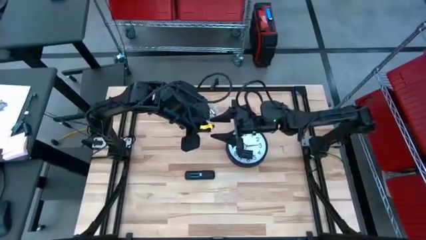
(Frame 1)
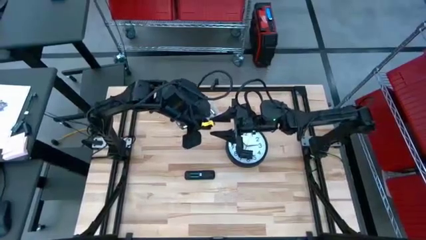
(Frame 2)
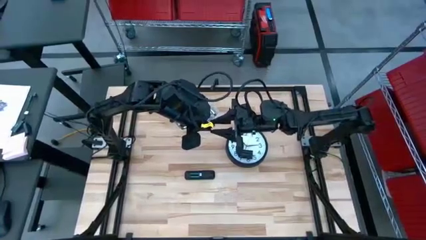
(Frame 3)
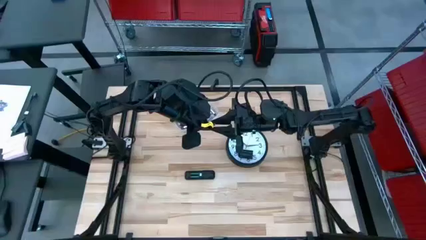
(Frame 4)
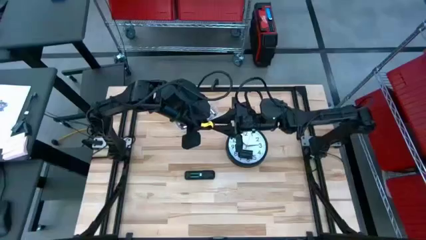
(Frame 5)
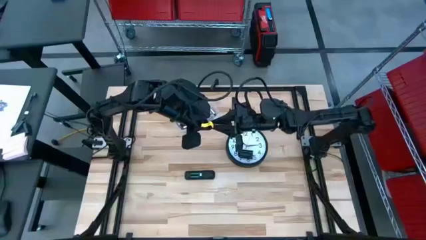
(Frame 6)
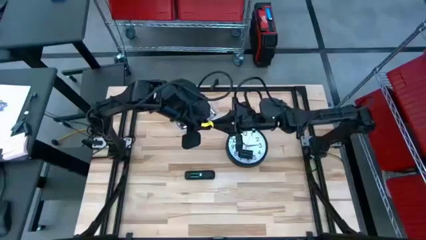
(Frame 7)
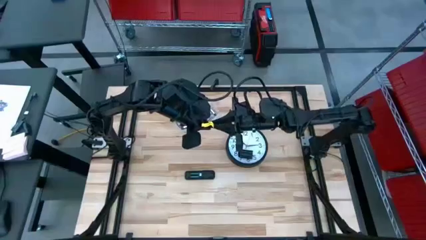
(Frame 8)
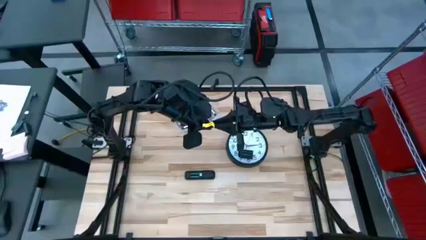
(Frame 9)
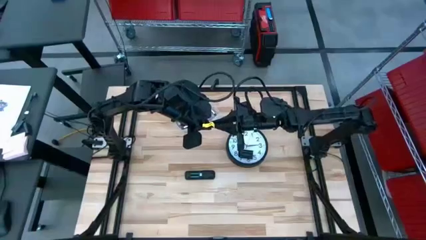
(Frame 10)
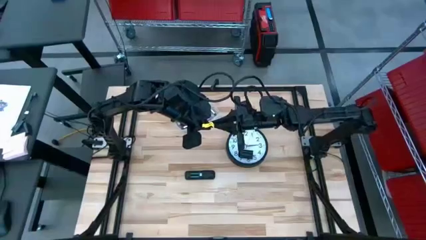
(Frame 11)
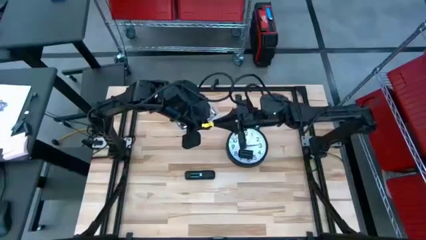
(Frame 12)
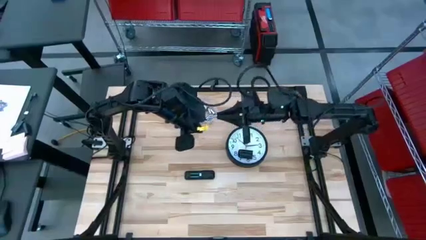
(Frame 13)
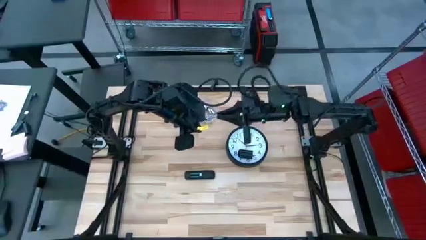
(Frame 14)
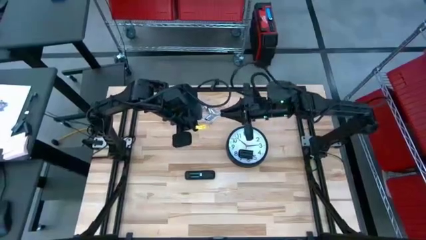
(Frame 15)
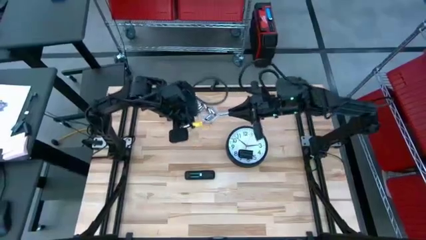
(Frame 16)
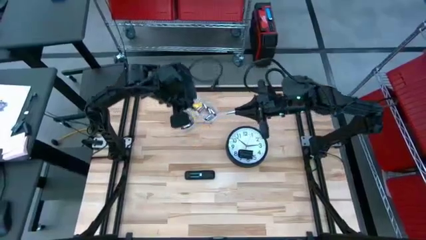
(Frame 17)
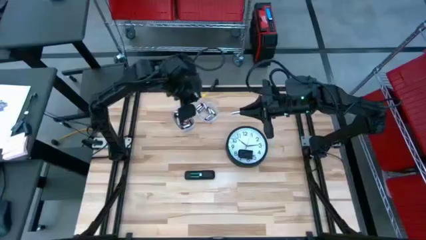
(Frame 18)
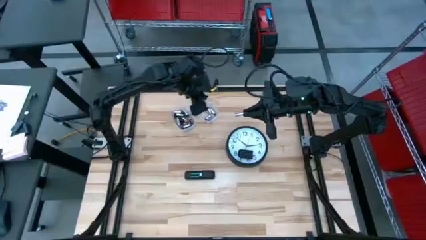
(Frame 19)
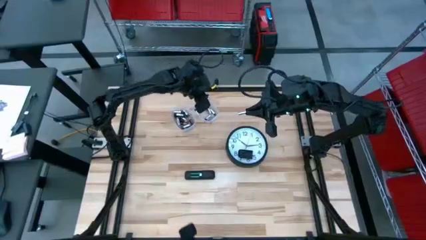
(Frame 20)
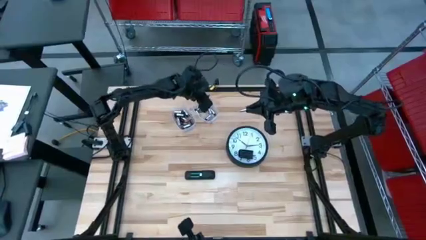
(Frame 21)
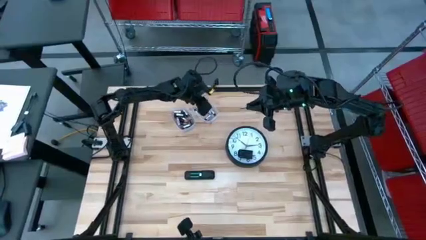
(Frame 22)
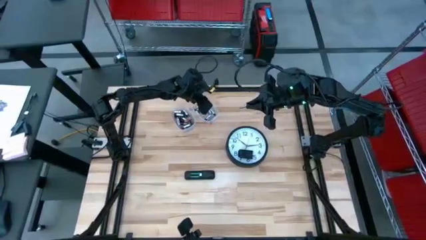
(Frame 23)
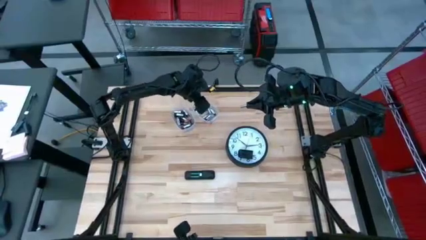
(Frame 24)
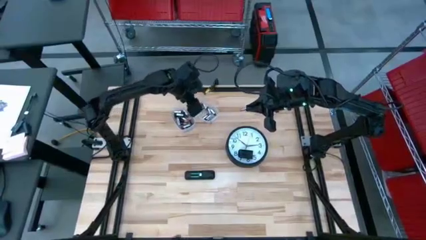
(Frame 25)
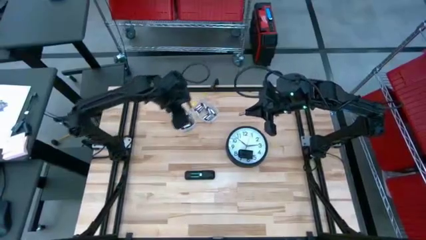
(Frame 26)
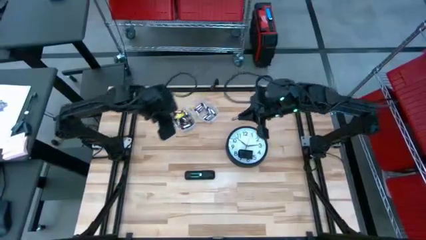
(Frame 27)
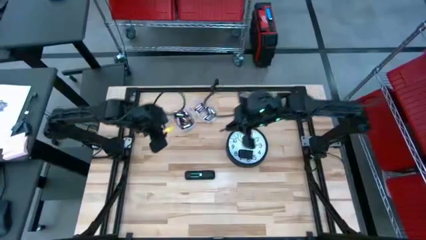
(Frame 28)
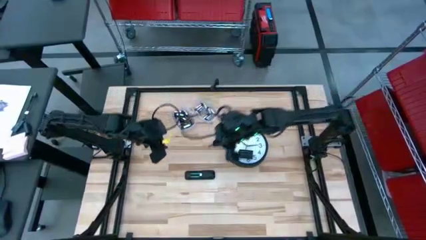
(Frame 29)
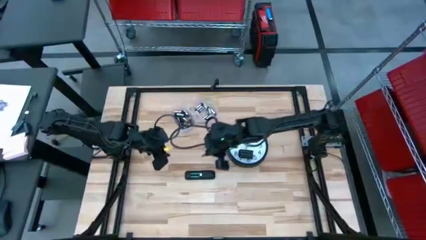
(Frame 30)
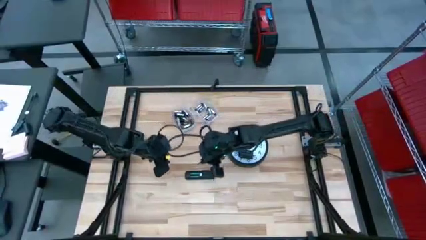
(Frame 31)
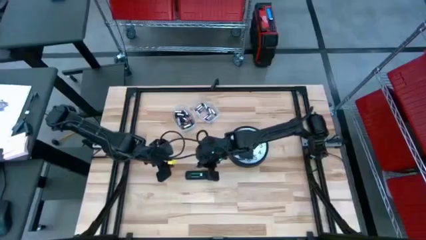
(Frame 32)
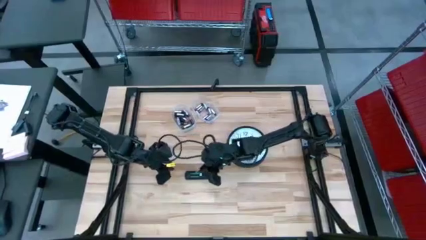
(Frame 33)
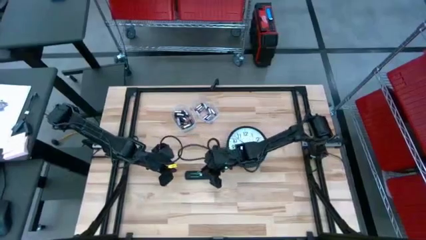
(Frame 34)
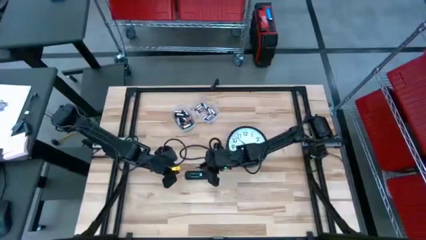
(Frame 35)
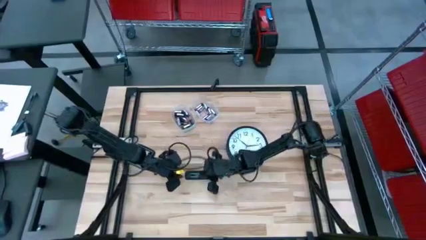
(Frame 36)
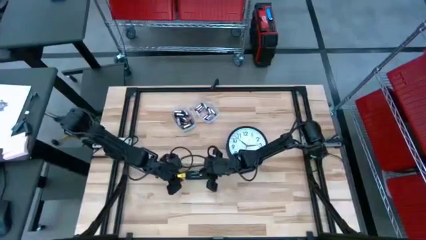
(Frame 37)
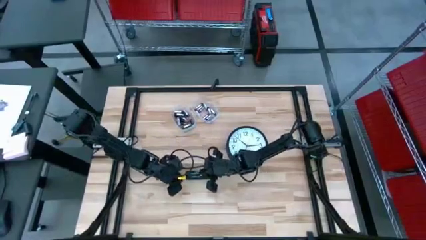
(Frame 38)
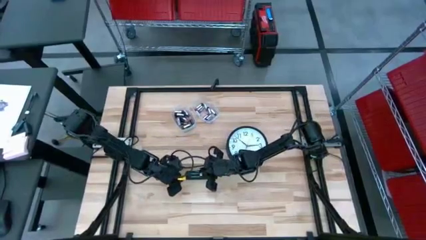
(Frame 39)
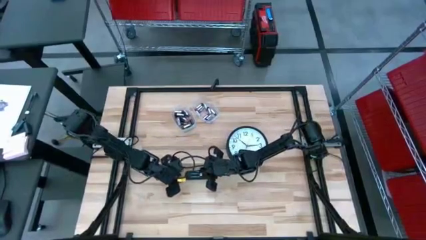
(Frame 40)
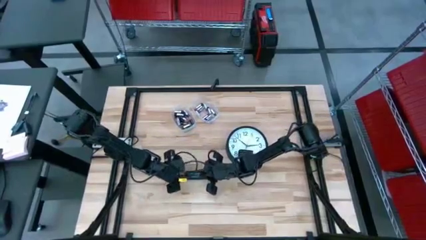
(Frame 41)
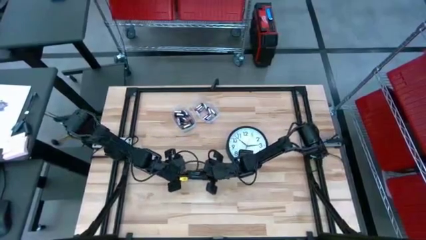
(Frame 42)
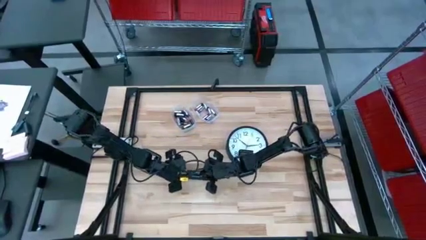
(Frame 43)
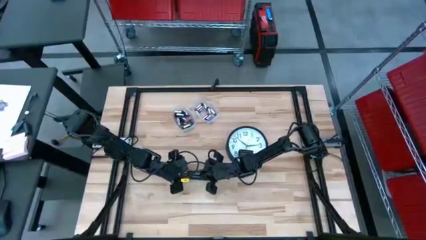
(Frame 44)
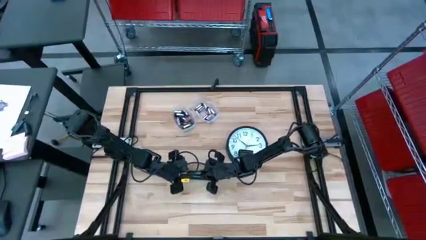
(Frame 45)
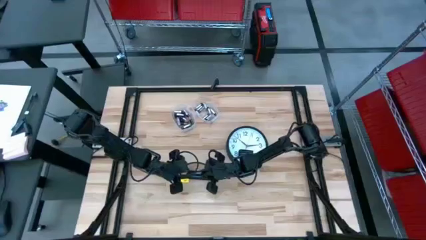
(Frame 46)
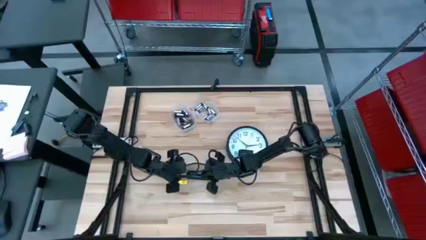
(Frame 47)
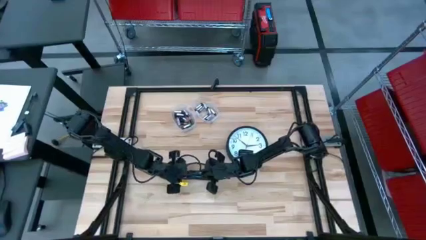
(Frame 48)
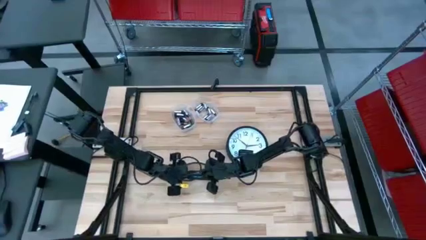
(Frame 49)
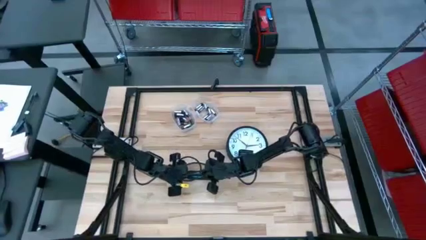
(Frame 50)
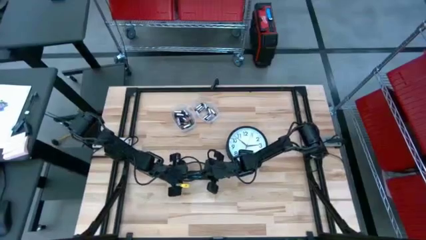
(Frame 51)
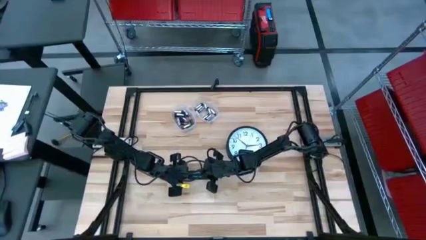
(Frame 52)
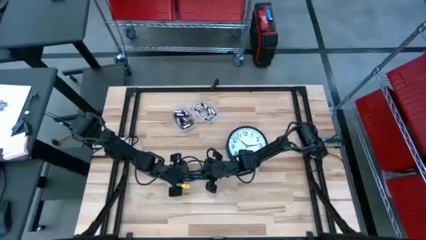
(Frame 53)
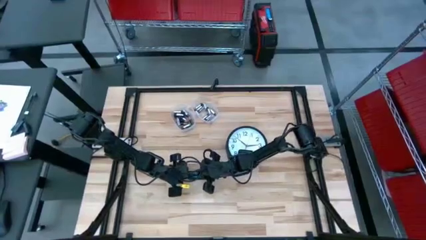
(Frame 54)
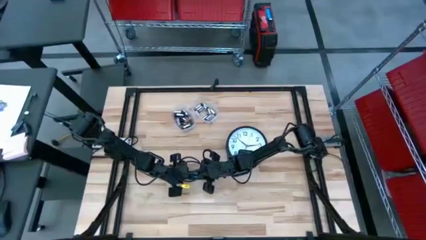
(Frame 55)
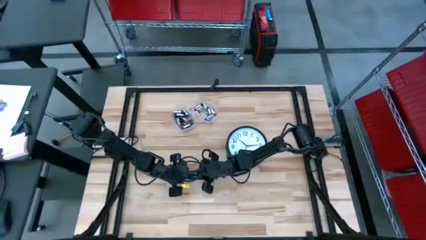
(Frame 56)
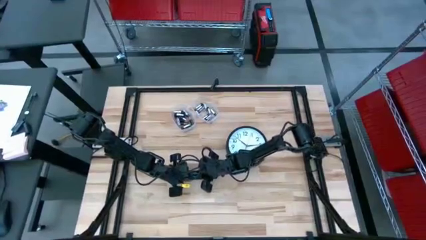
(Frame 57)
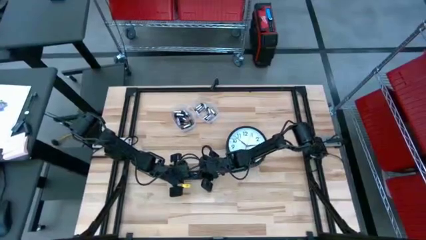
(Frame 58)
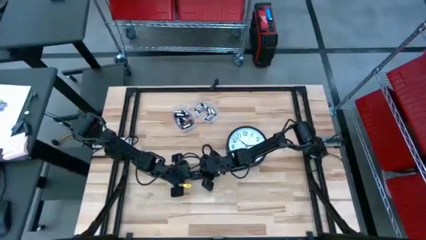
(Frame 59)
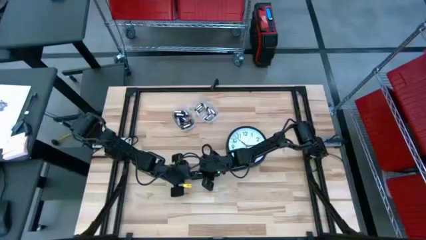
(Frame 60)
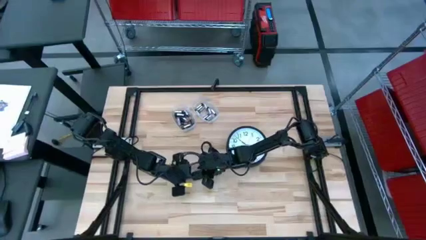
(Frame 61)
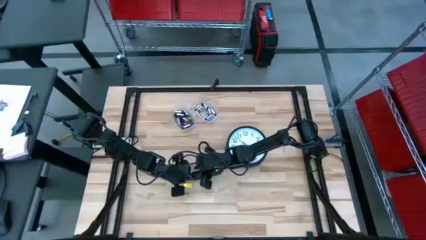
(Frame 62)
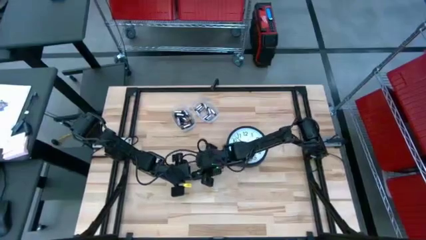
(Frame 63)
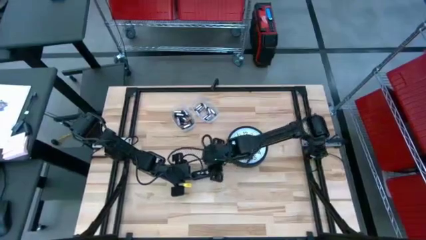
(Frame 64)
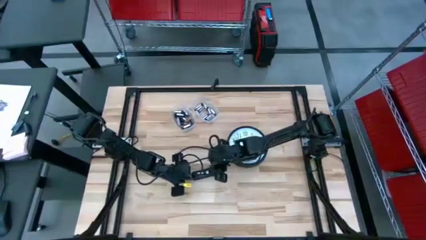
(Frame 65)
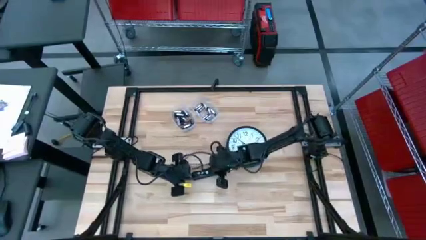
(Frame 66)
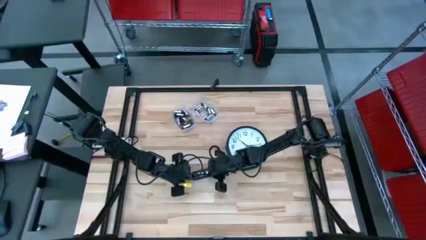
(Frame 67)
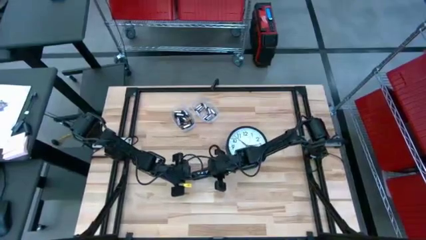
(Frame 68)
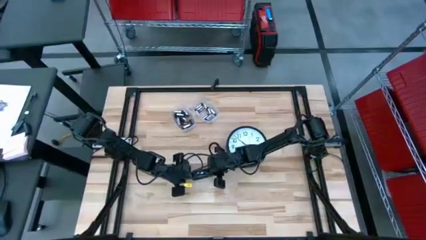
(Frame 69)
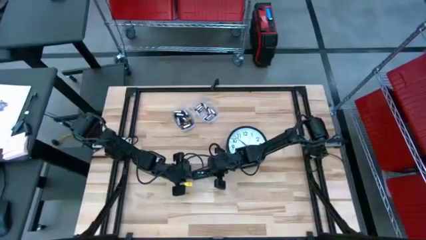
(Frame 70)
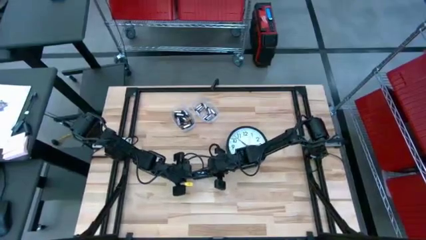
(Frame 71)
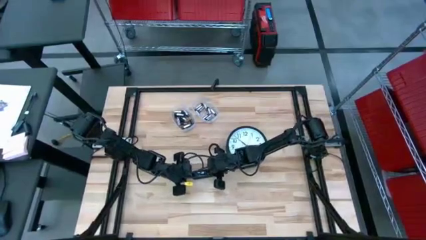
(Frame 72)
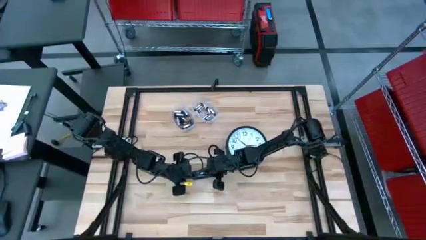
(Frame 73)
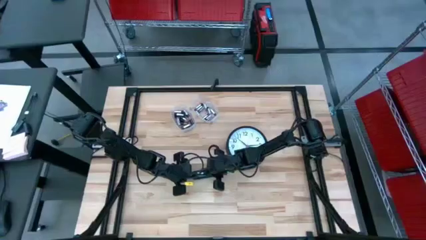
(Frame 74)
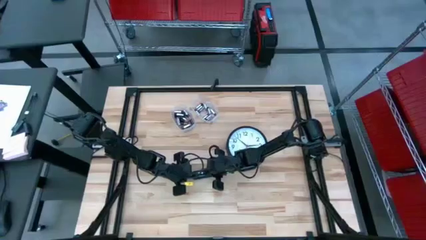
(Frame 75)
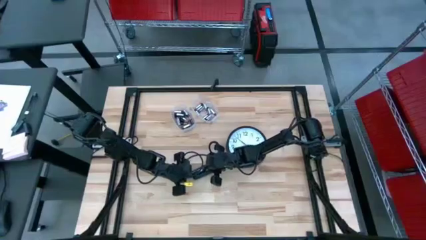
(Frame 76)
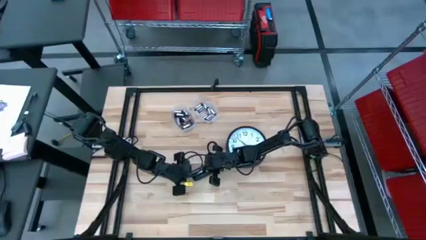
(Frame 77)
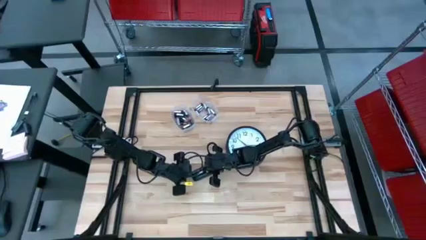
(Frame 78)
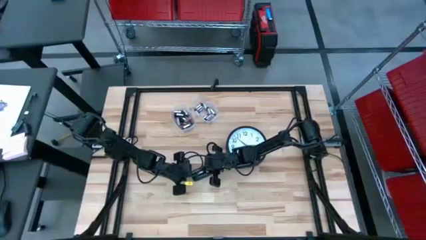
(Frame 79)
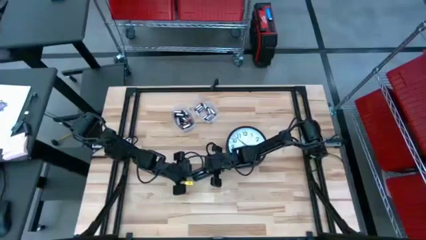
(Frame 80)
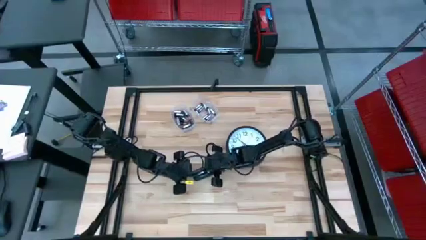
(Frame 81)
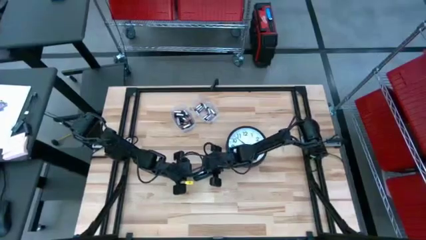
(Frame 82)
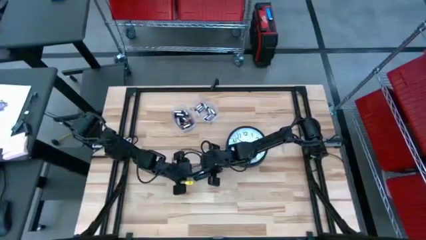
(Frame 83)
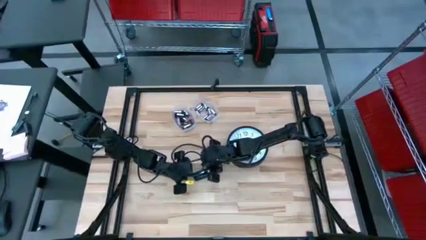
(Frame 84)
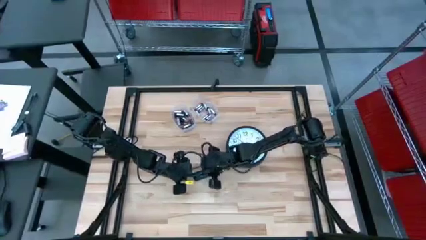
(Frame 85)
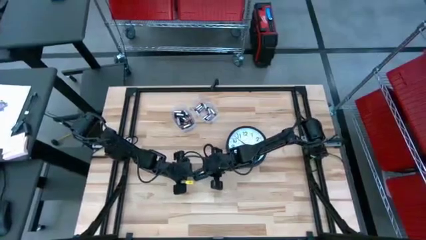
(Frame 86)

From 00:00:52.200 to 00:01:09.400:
Task: Insert battery
Insert the silver battery into the remote control
